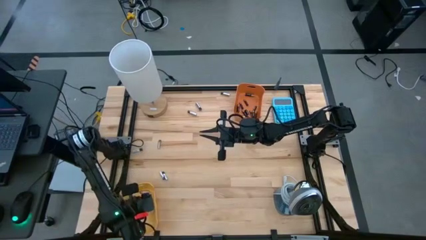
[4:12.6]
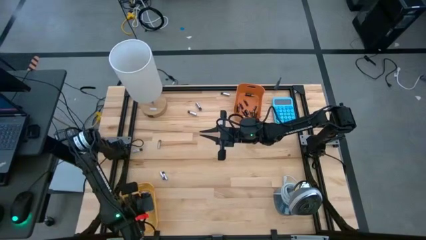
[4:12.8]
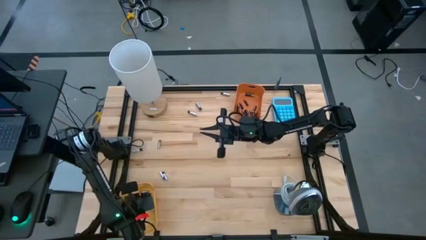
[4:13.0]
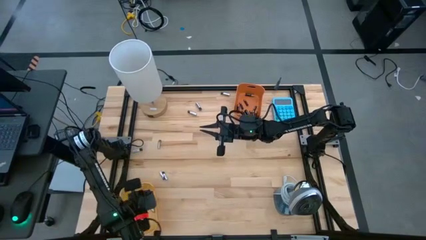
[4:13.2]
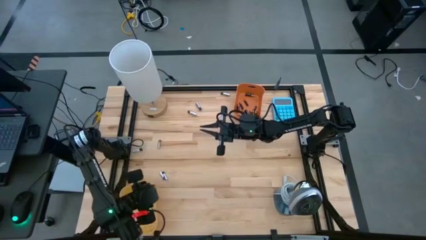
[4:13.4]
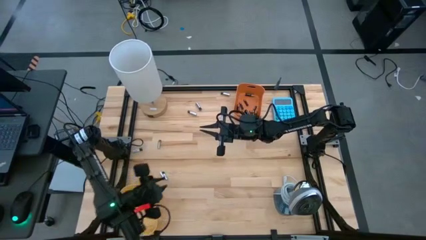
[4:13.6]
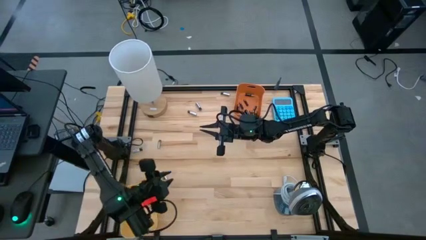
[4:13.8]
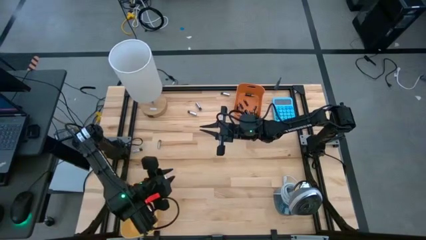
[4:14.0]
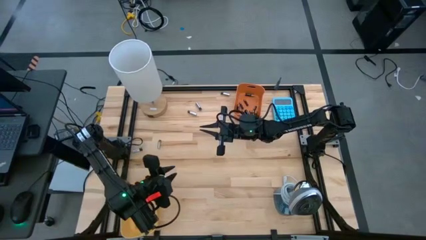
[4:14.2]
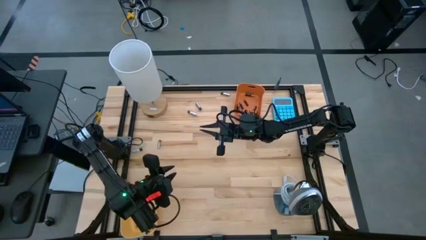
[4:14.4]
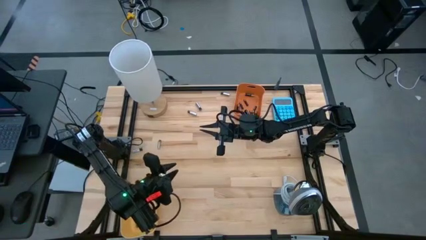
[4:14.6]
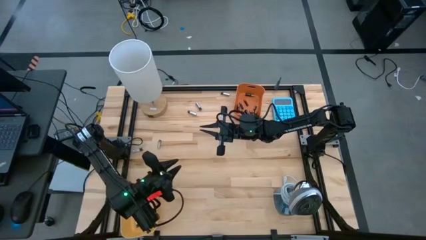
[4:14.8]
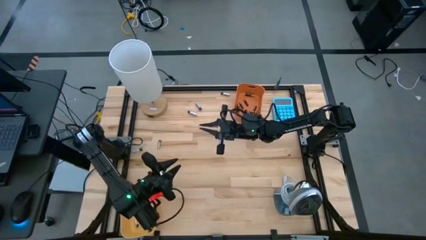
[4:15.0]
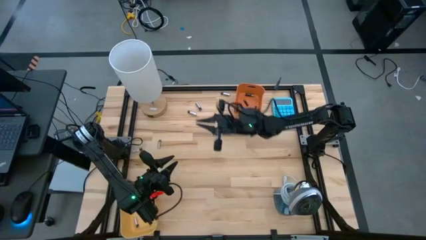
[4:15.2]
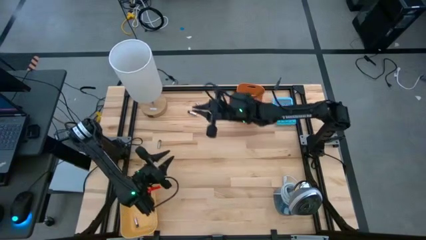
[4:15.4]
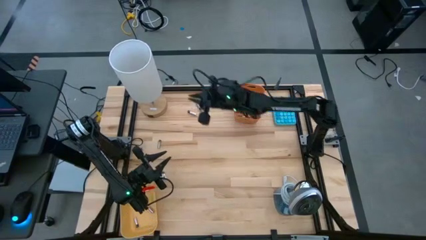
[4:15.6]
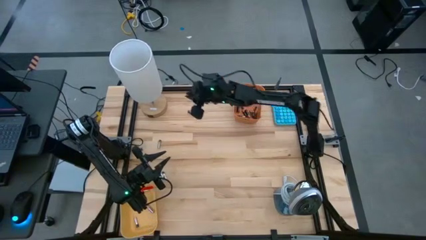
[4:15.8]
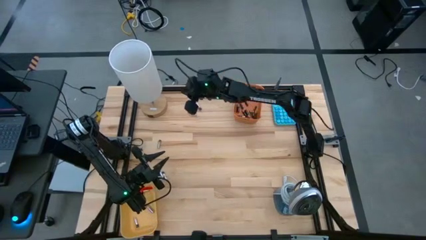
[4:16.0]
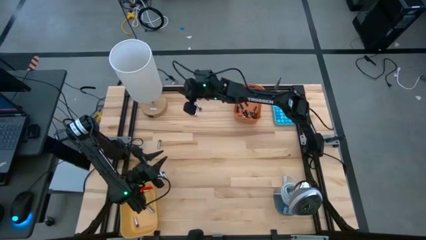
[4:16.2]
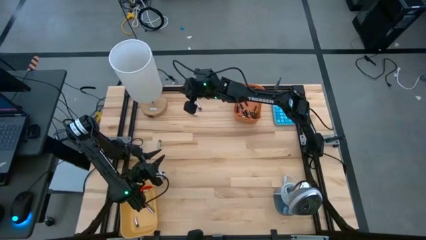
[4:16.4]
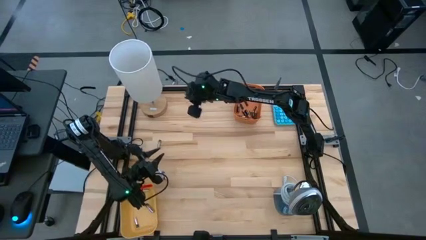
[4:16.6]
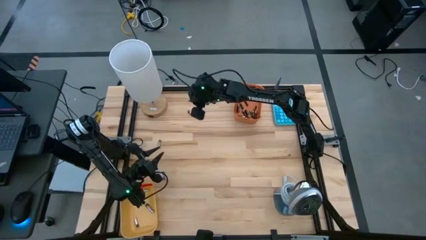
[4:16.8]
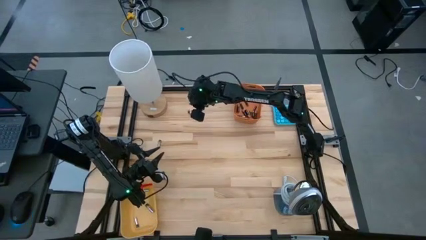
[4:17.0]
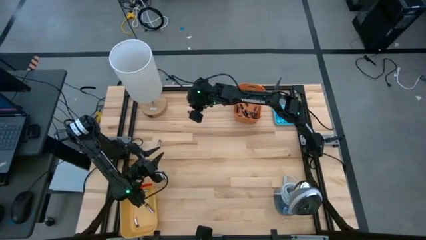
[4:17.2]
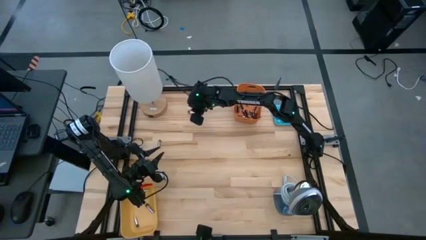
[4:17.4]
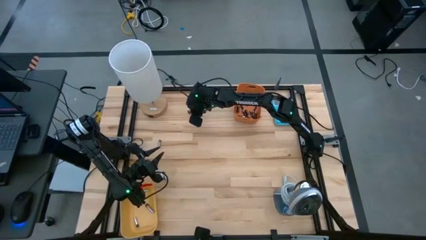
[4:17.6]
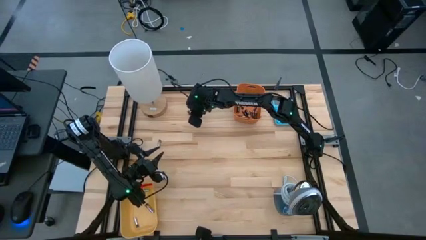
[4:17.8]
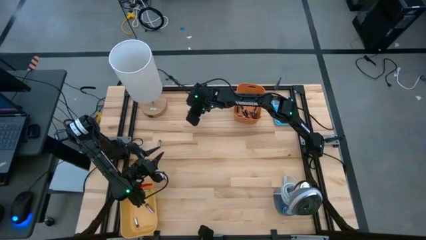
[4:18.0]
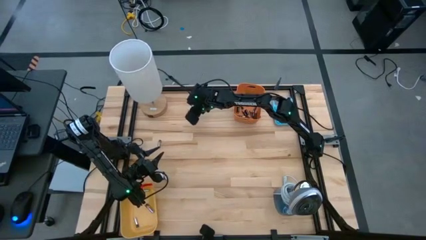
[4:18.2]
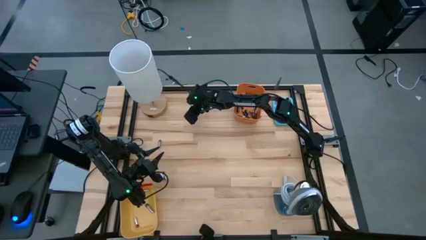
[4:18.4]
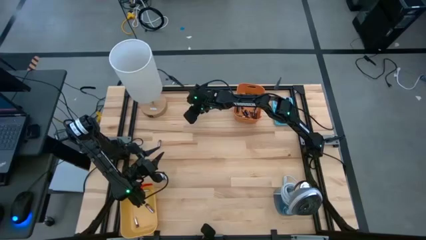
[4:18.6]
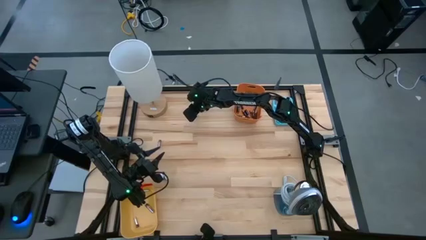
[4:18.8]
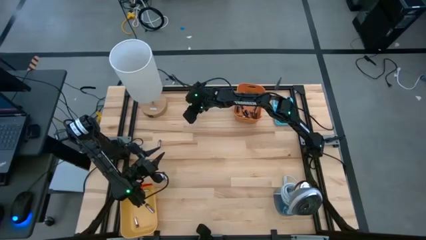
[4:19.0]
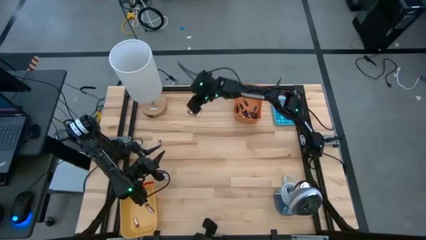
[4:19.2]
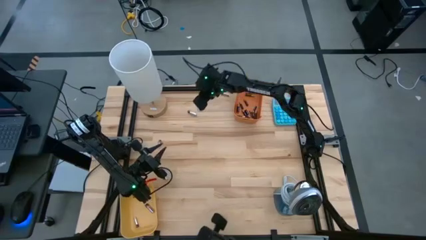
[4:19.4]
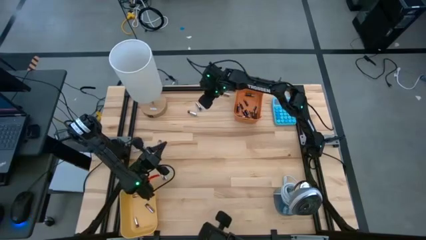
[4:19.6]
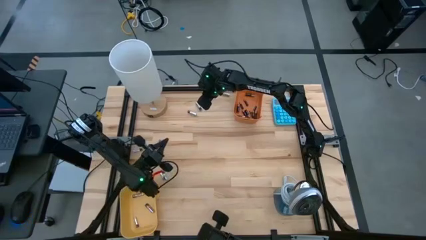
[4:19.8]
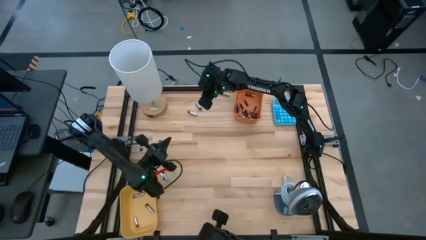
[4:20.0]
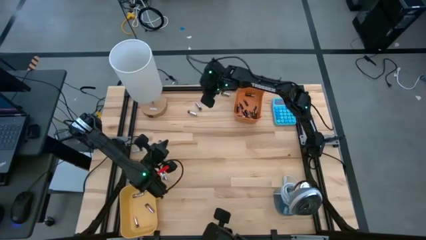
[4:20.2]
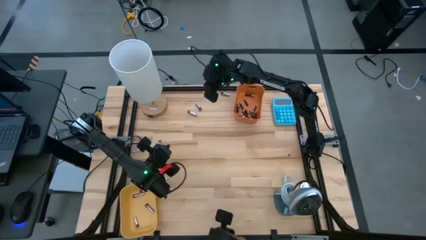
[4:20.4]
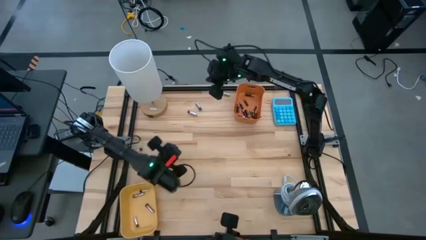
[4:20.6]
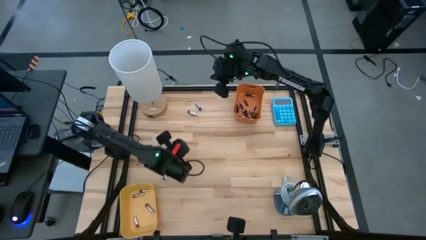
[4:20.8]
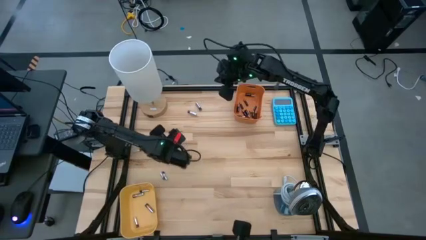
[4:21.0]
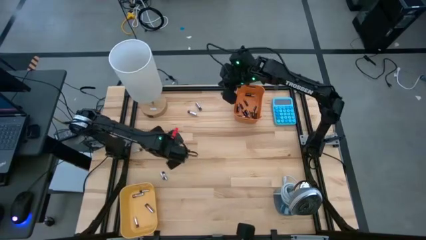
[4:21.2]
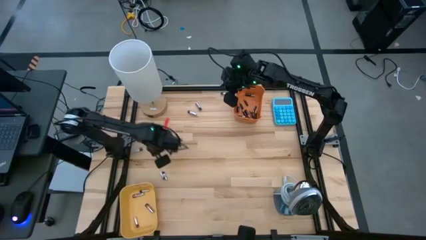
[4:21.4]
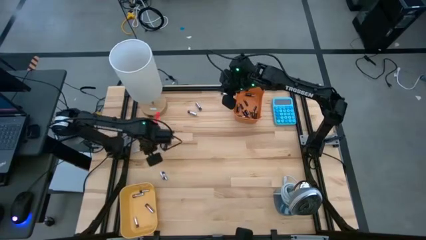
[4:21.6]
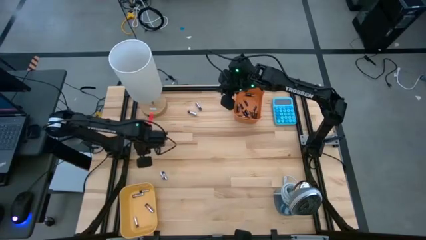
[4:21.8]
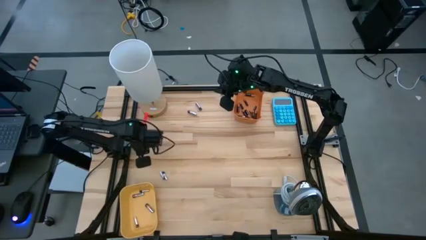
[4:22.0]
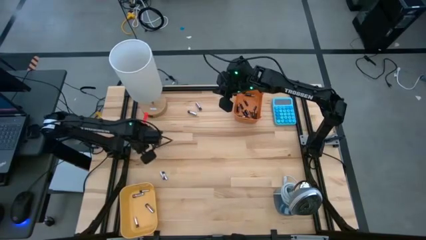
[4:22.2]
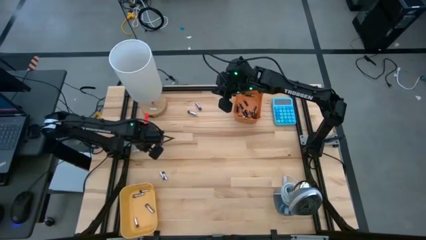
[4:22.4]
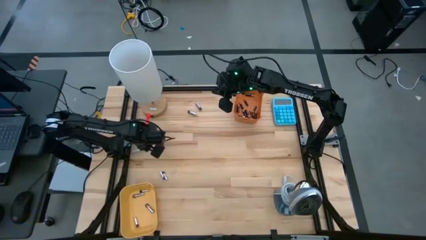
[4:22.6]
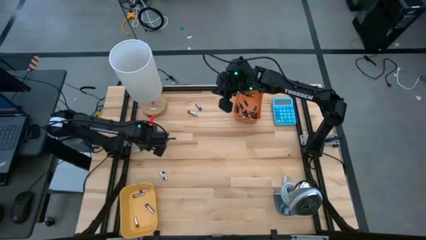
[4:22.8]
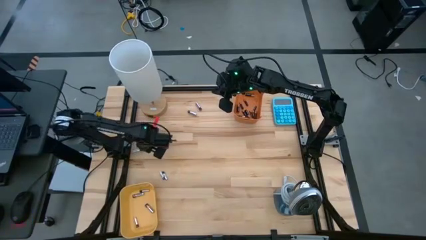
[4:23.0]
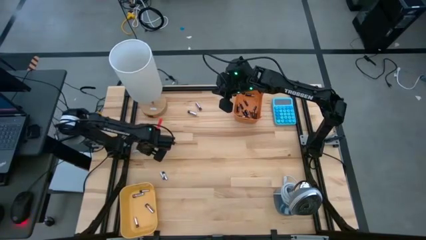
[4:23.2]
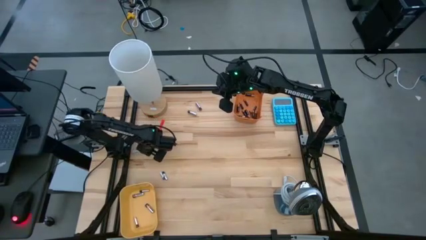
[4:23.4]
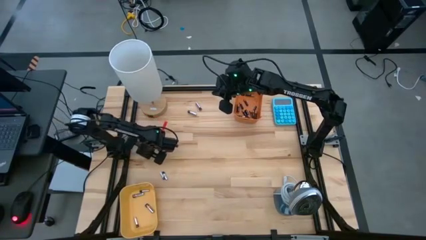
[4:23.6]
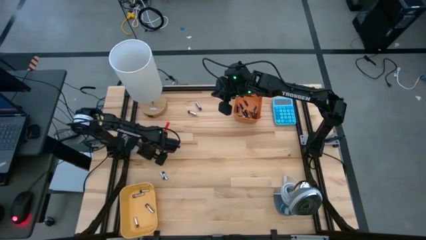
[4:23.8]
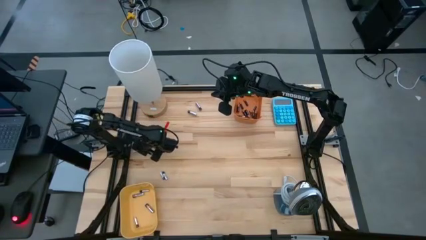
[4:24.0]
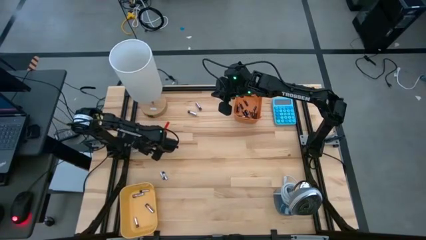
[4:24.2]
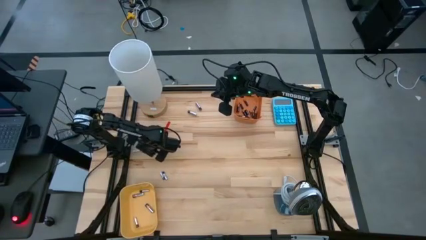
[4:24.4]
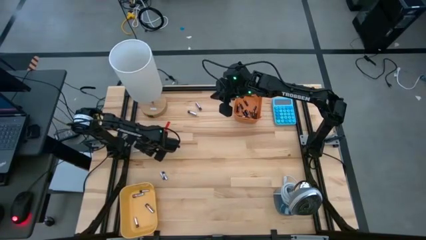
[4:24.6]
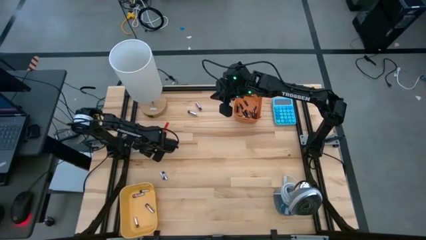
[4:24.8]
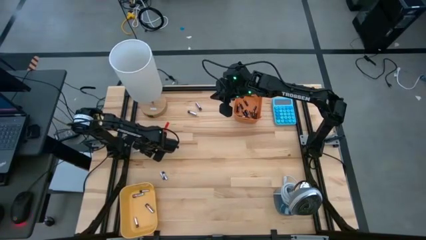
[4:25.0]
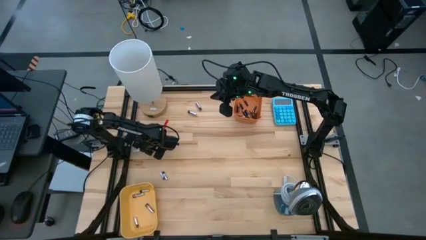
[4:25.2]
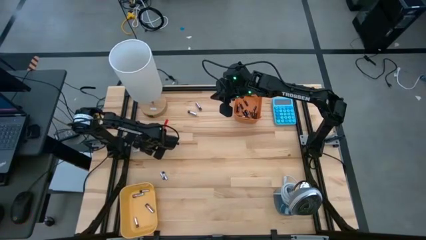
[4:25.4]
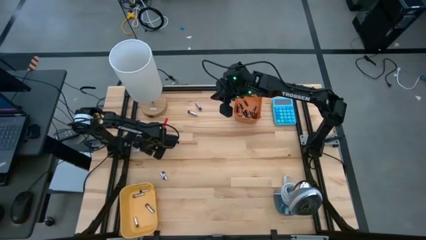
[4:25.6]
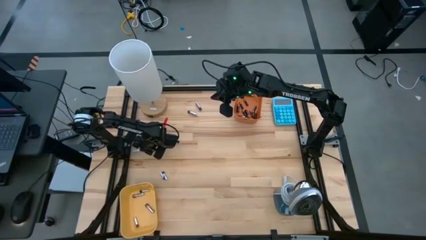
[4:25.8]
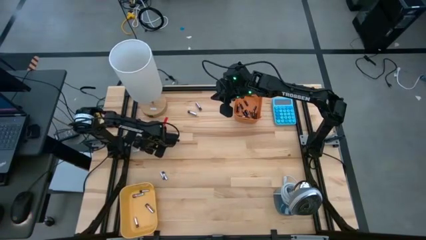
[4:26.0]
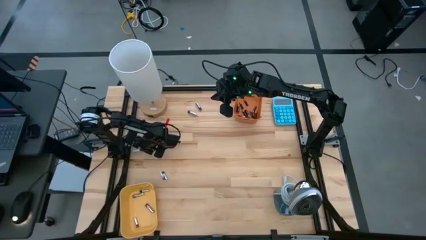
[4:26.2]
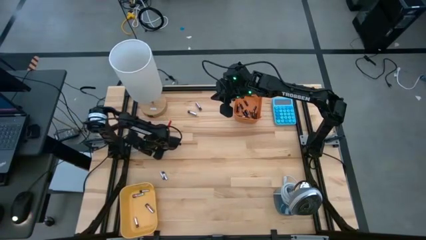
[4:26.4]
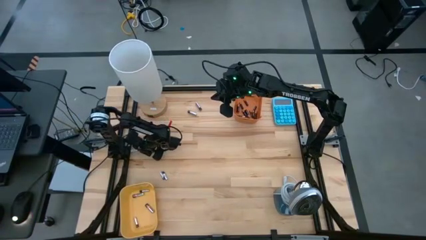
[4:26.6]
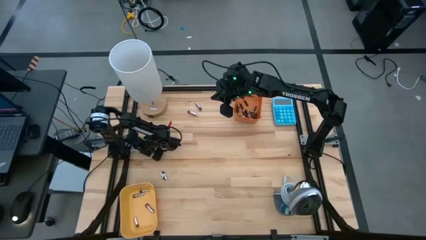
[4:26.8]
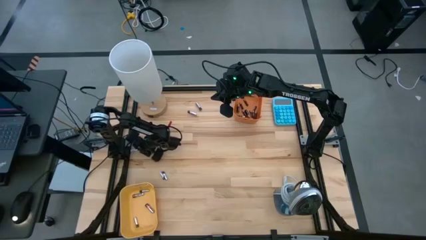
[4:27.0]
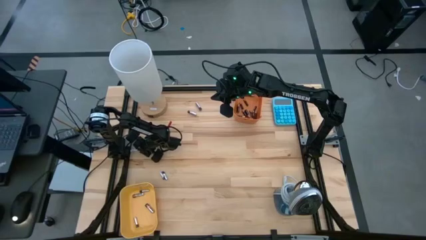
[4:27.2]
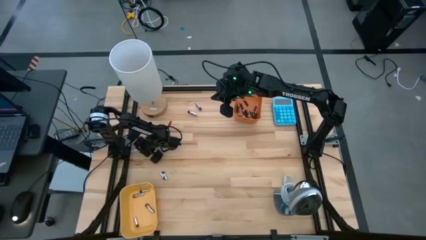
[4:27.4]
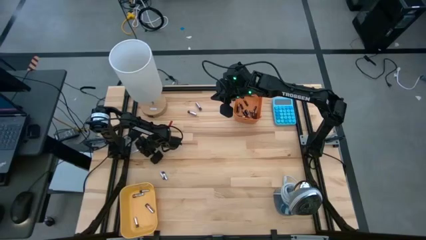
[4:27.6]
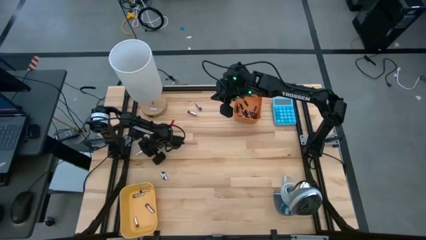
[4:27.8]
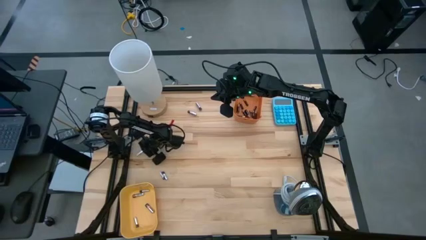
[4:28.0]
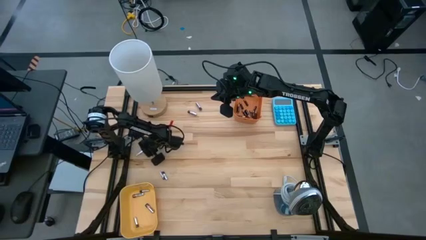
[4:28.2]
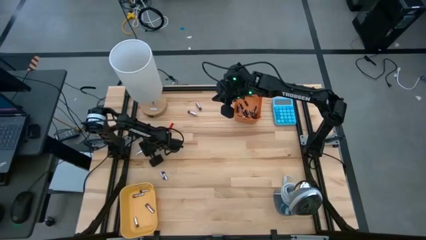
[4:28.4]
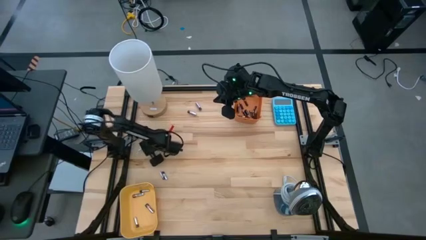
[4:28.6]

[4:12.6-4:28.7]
Task: Sort batteries
Put the silver battery into the yellow bin
